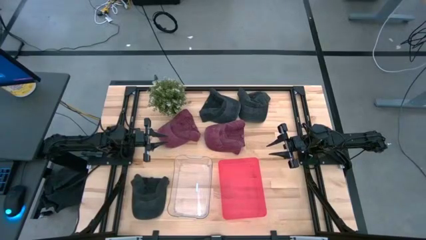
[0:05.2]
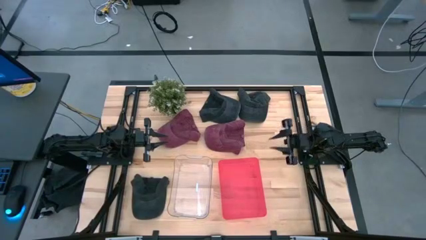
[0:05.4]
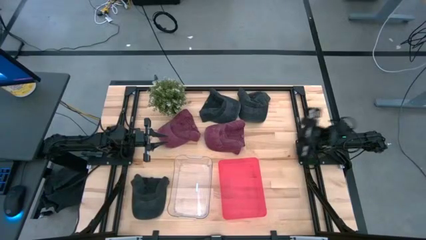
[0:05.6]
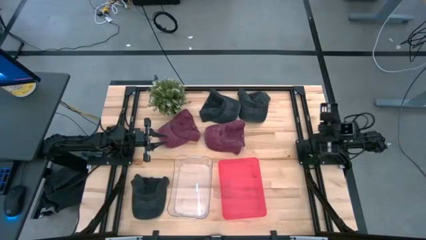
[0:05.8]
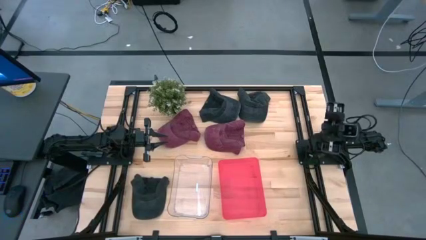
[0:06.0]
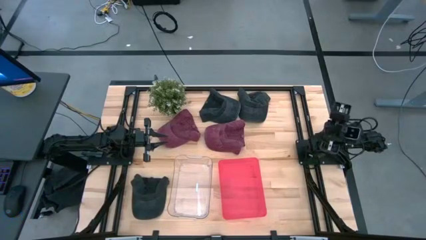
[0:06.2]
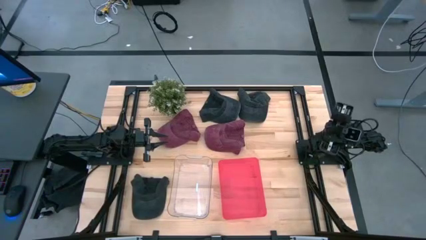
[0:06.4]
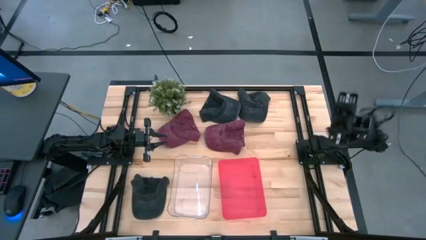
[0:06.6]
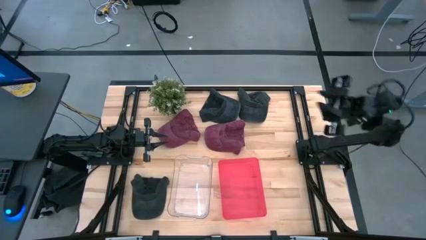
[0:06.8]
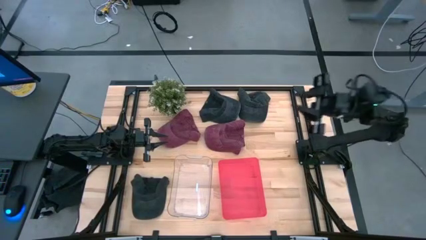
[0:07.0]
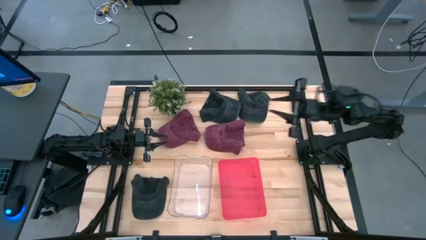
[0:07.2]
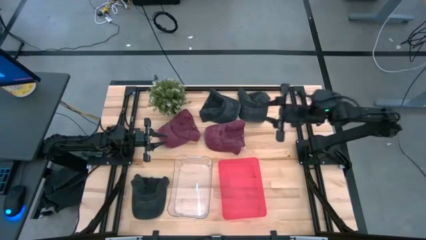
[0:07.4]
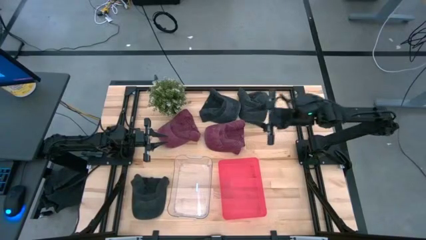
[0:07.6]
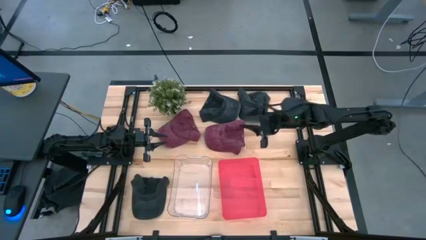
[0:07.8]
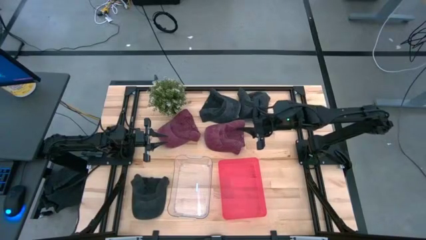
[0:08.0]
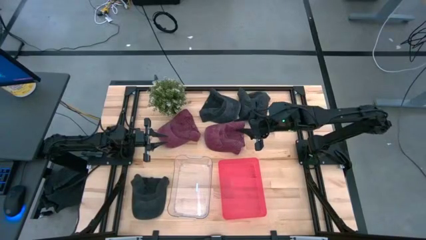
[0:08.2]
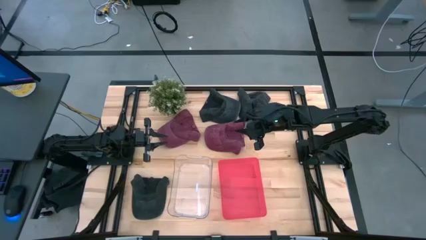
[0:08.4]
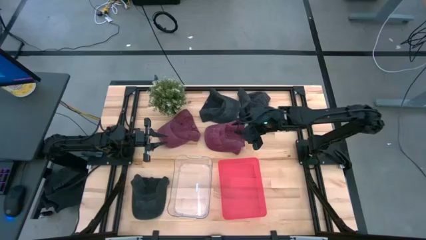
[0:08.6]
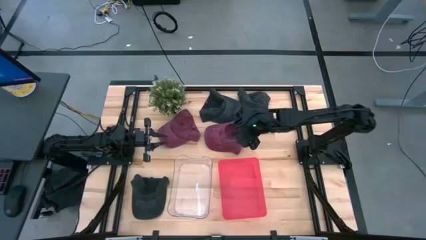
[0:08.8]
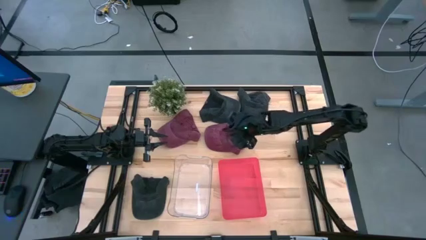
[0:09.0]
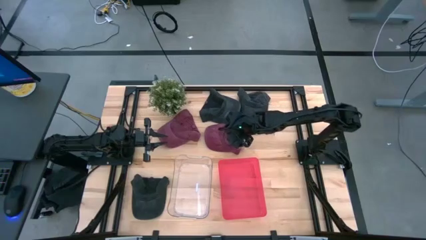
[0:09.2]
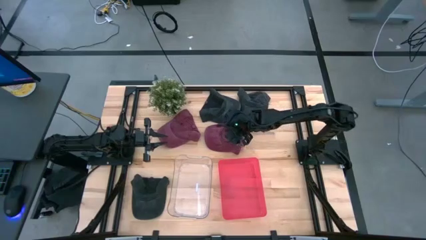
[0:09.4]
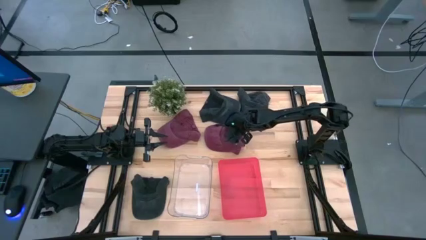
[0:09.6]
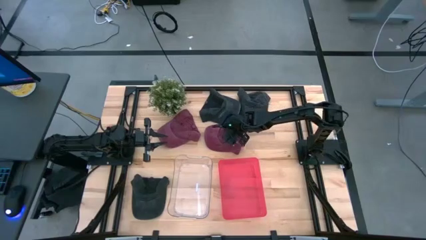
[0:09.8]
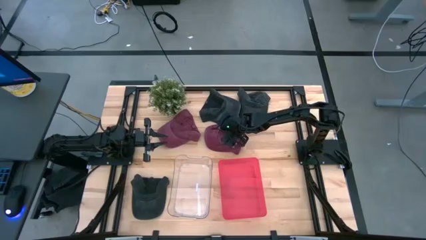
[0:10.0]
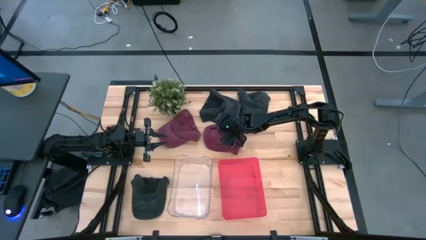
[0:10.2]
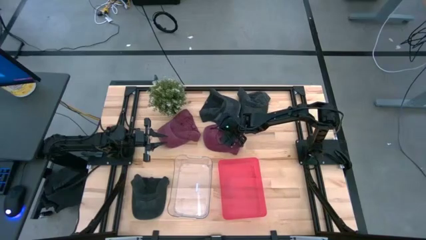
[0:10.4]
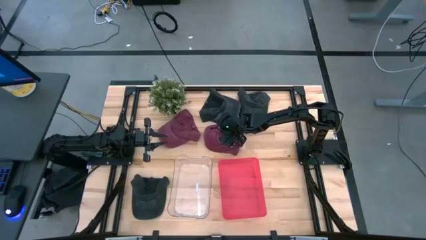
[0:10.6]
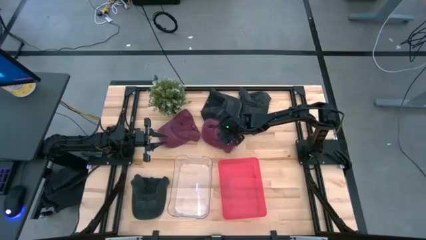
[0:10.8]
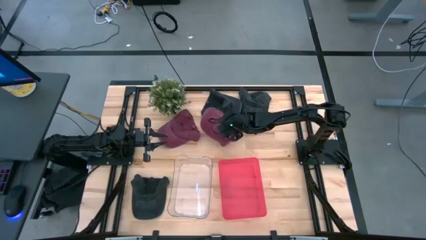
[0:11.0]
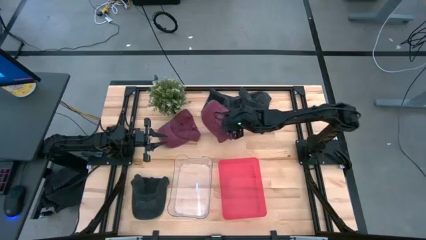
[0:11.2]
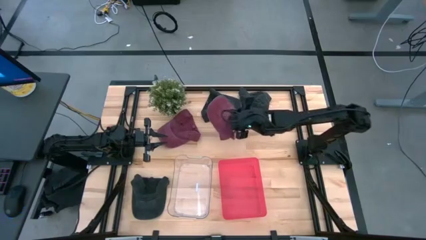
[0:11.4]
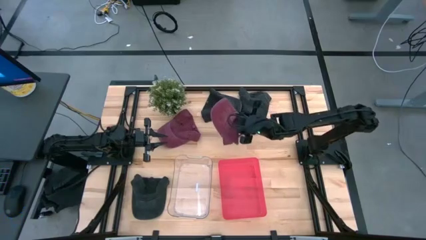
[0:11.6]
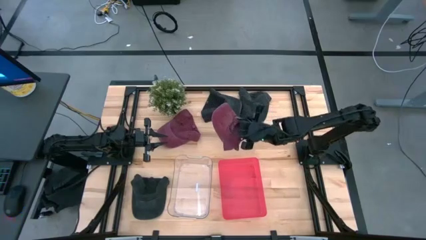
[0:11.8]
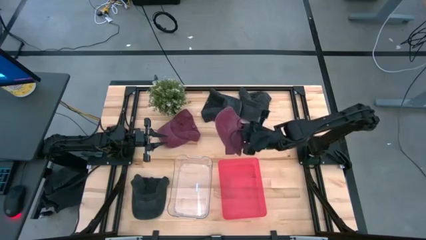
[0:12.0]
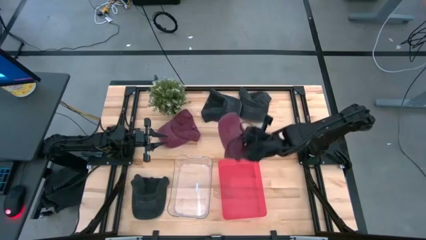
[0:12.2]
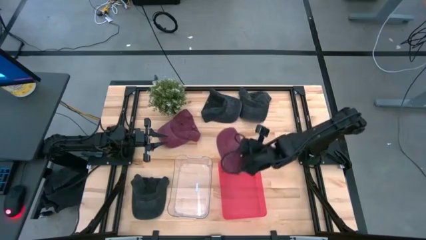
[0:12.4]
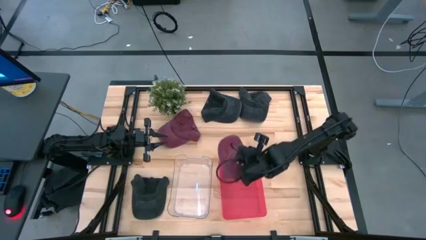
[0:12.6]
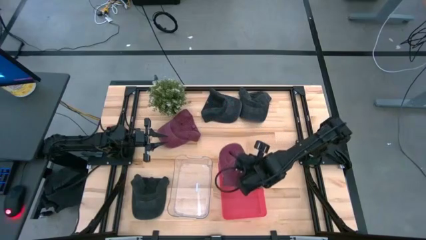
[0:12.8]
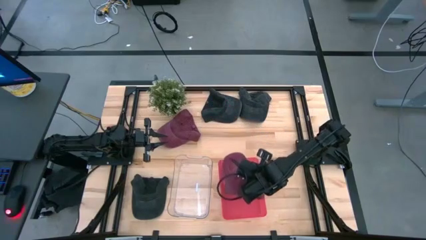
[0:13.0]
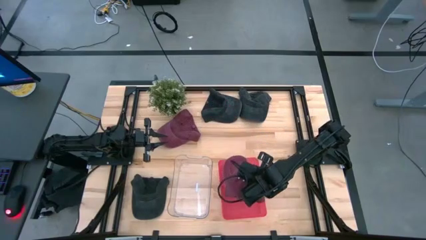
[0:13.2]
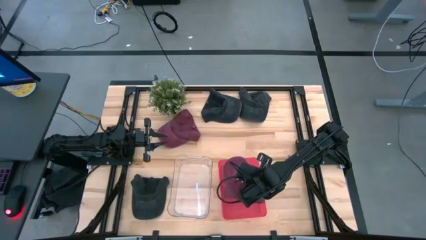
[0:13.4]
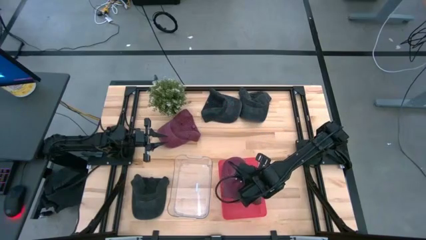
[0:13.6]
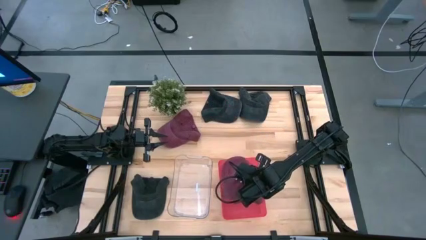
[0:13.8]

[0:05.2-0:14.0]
Task: Pick & Place hat
Put the right red cap into the red bin

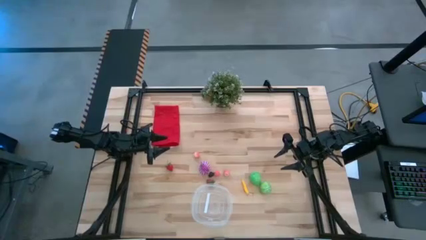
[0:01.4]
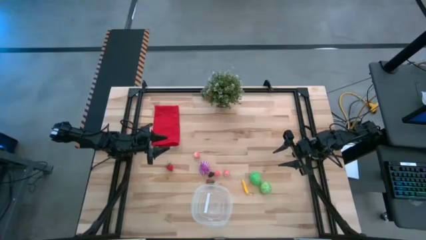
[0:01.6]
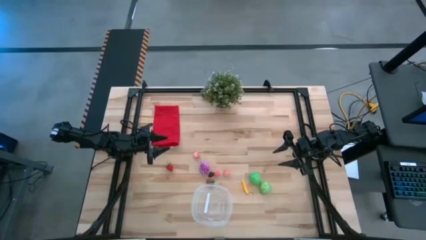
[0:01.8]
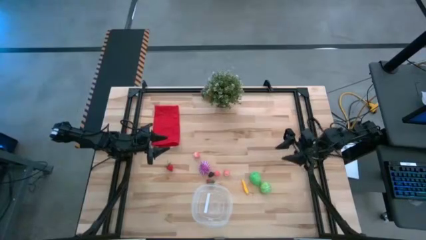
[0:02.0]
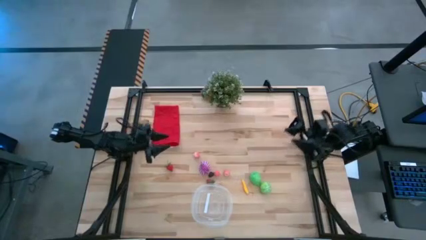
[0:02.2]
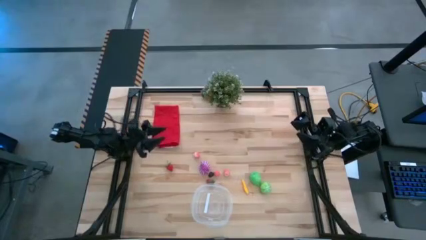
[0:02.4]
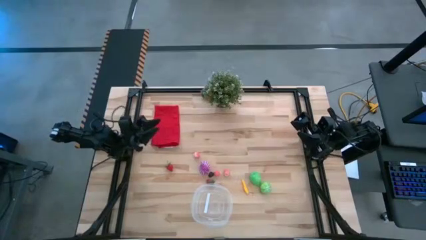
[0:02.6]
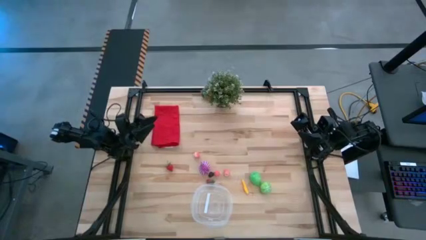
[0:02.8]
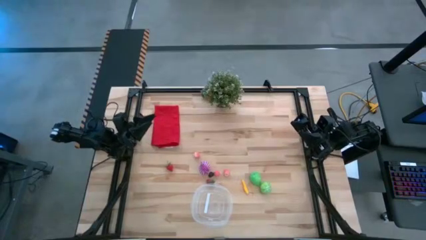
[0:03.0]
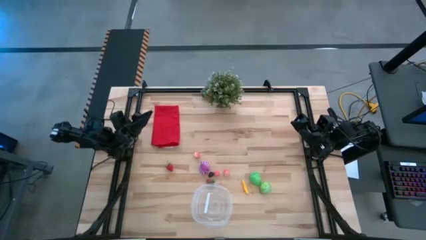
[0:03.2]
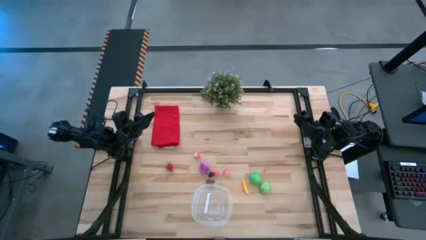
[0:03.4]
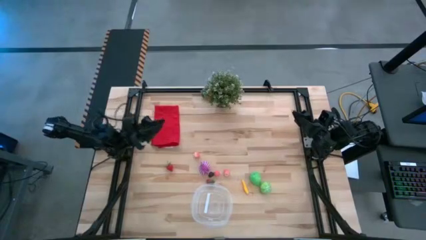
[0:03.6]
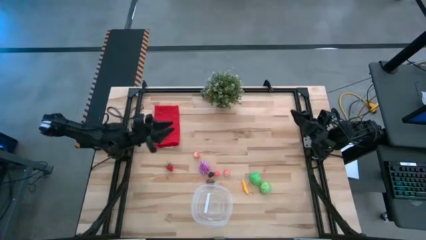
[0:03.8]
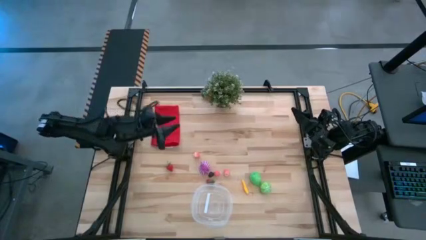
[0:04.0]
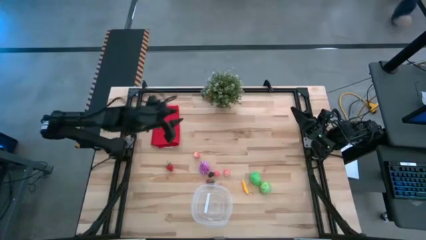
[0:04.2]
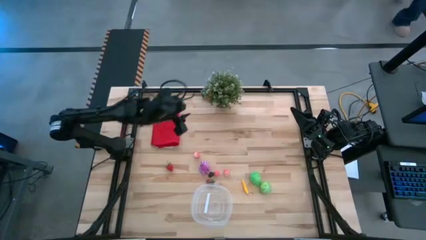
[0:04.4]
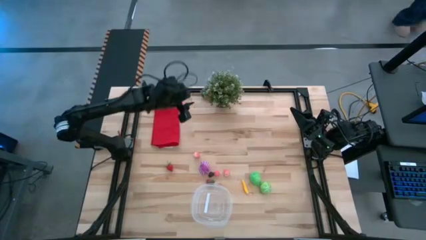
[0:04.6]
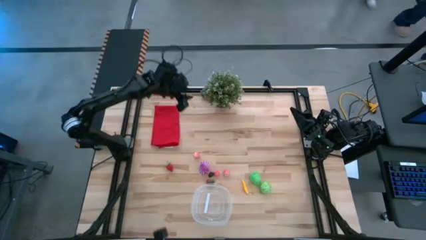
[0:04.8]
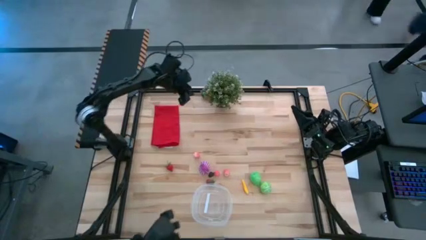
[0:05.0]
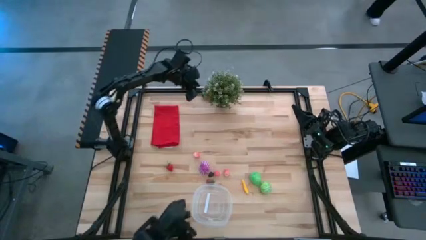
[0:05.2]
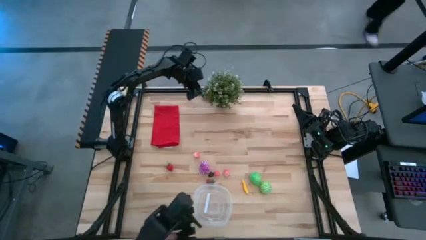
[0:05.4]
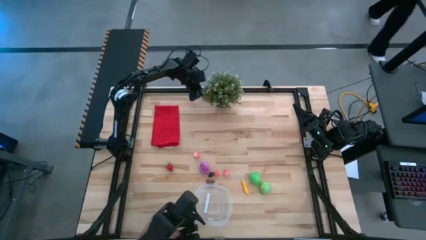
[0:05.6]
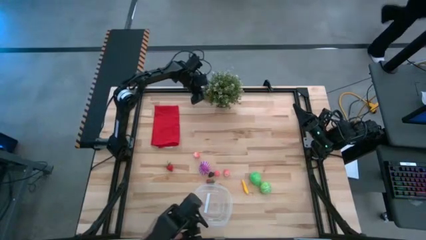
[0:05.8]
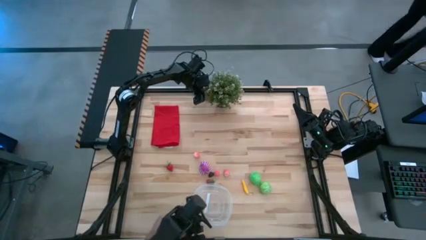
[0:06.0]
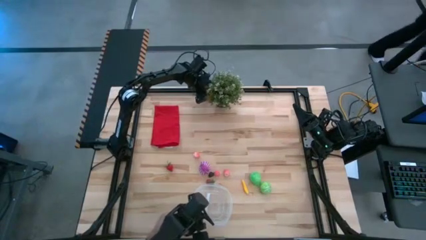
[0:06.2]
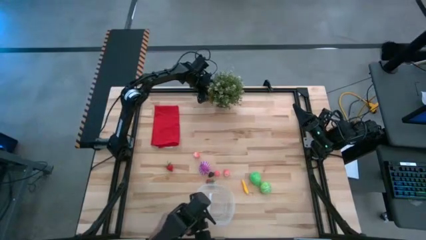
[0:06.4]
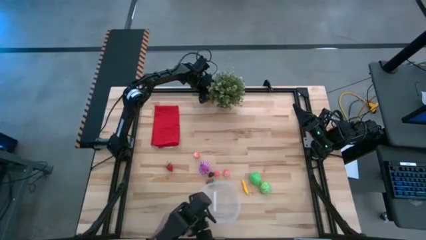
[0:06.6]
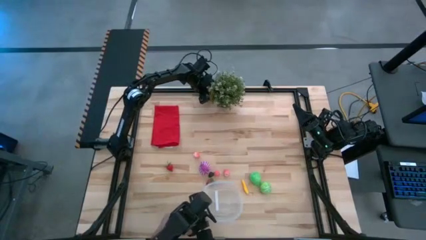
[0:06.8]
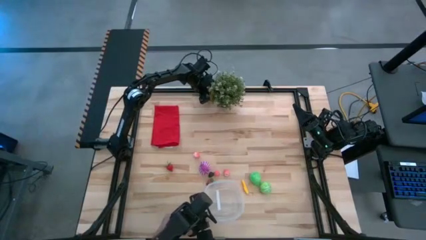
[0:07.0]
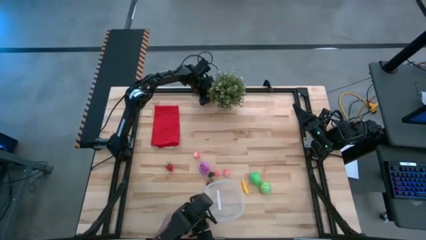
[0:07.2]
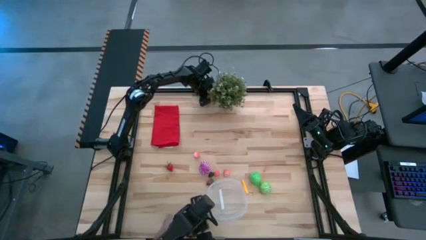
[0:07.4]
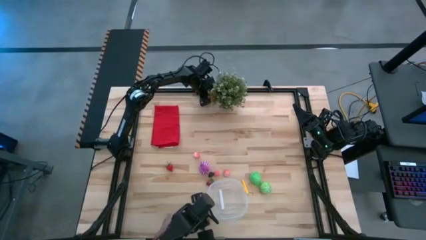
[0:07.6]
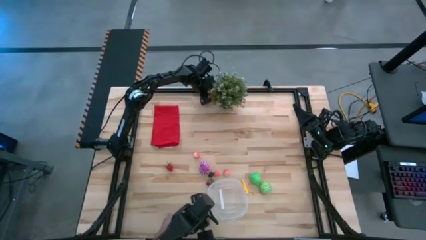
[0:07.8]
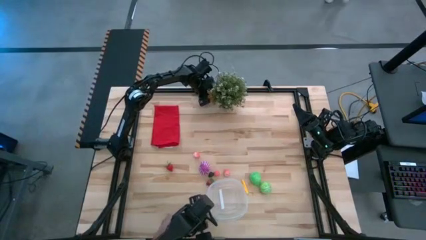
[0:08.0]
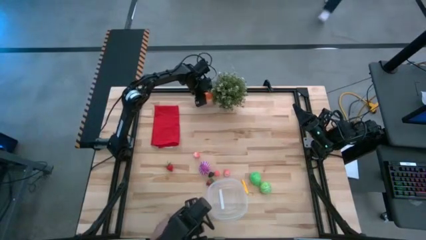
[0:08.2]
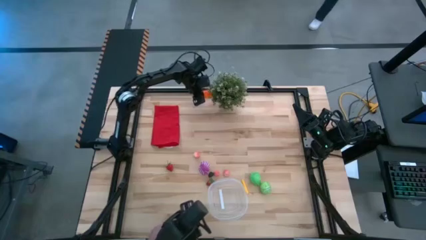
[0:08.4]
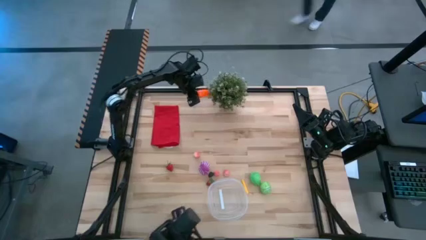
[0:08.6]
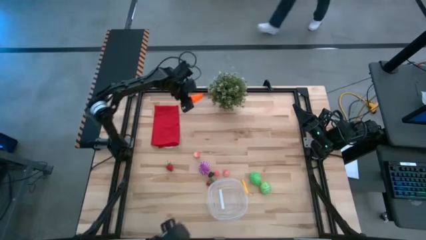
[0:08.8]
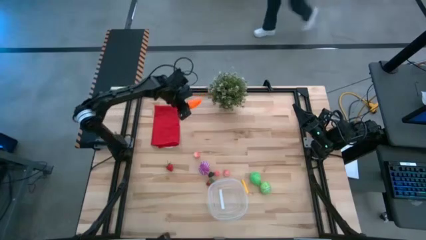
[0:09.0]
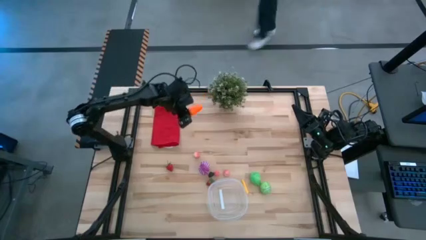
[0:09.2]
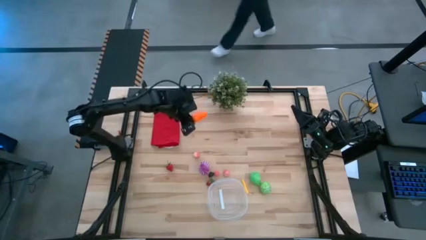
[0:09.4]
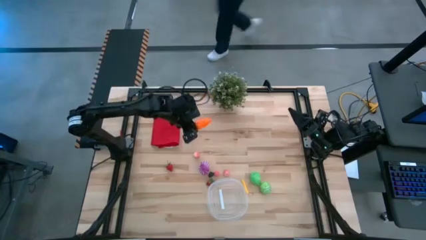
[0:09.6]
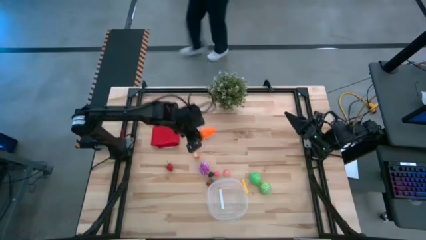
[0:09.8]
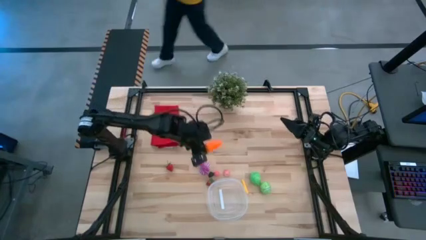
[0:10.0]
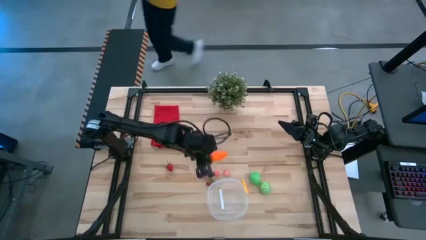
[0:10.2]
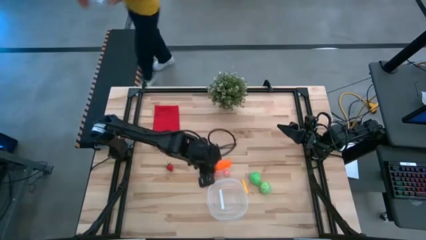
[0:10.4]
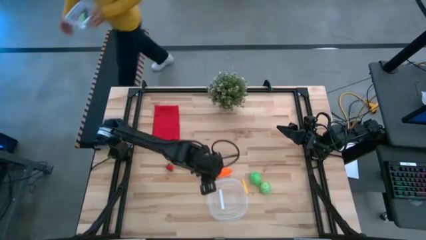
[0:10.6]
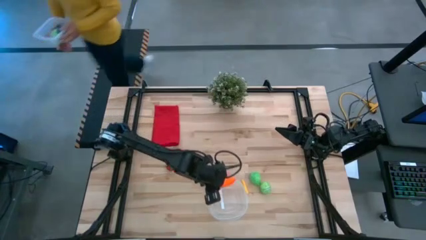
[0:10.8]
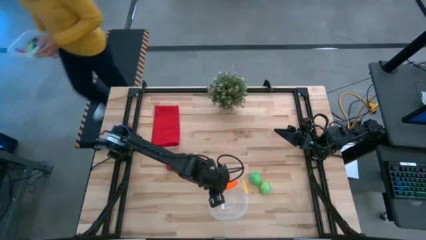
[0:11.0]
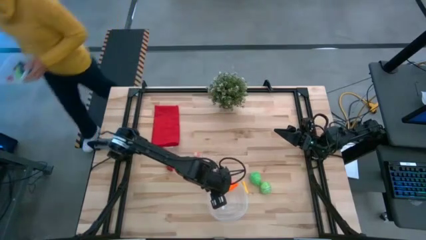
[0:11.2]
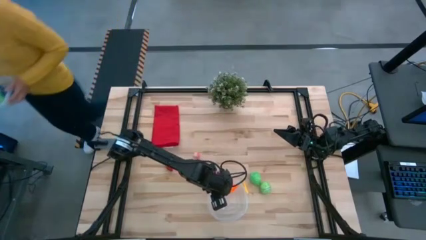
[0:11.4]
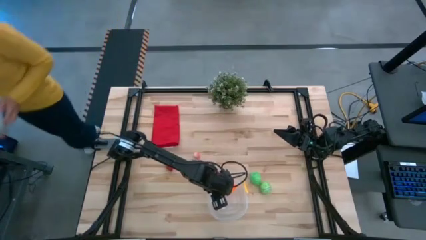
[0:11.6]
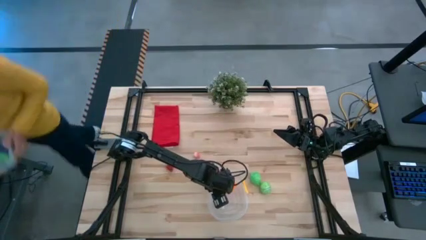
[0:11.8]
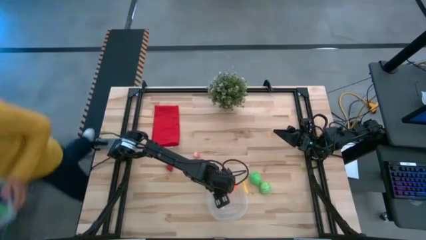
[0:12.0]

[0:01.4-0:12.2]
Task: Pick and placing Produce into tupperware
Put the orange carrot into the transparent bin
